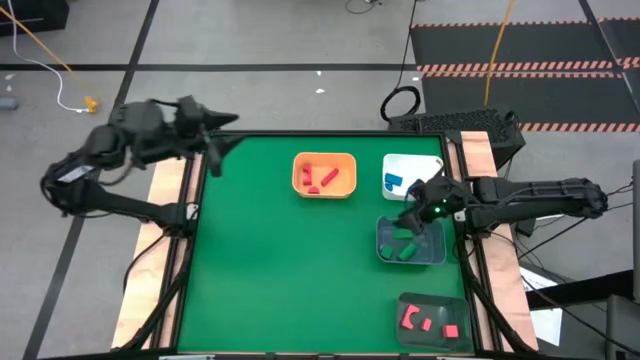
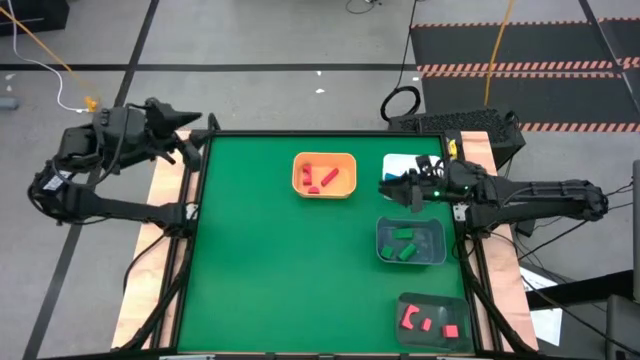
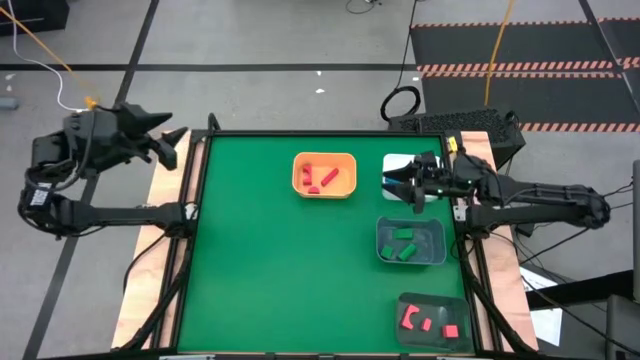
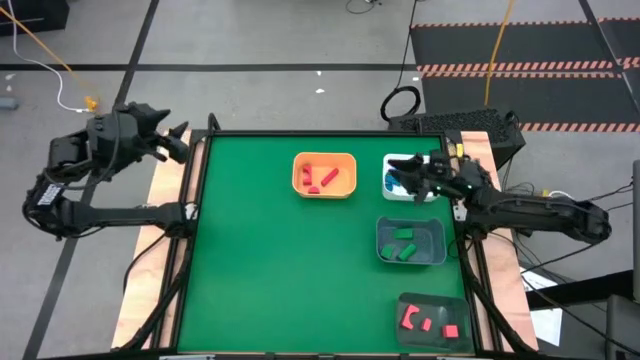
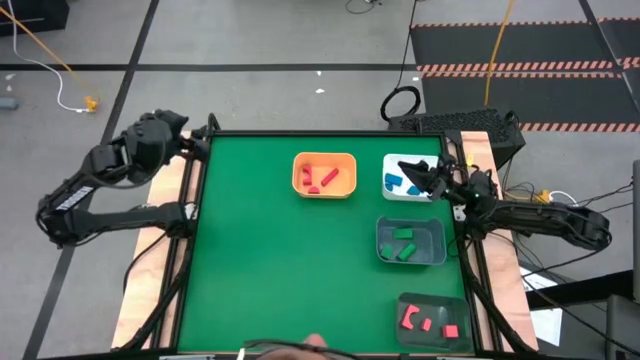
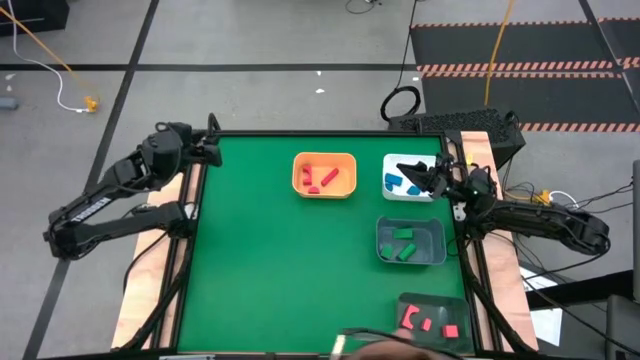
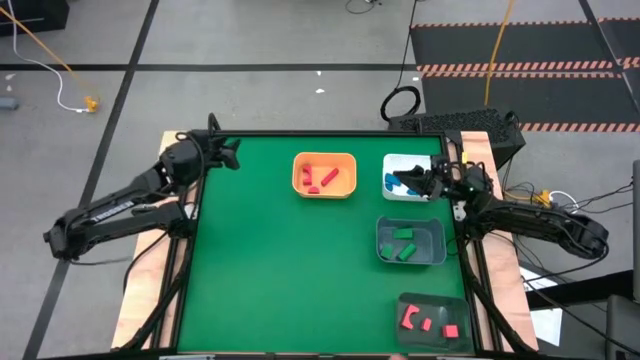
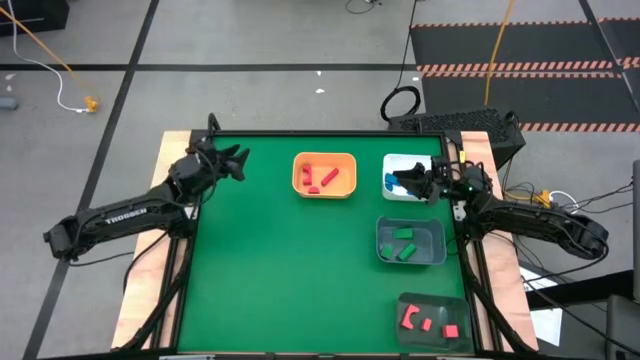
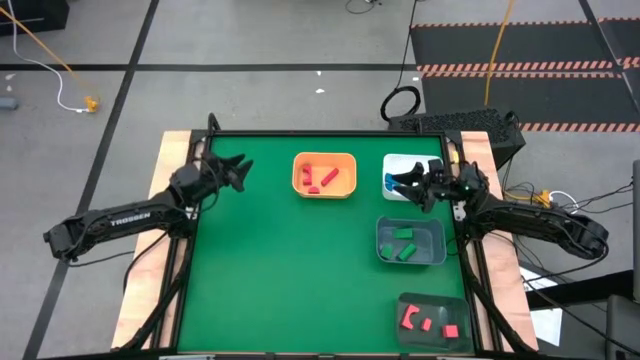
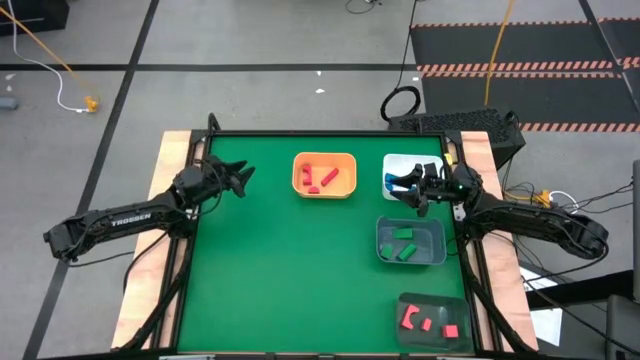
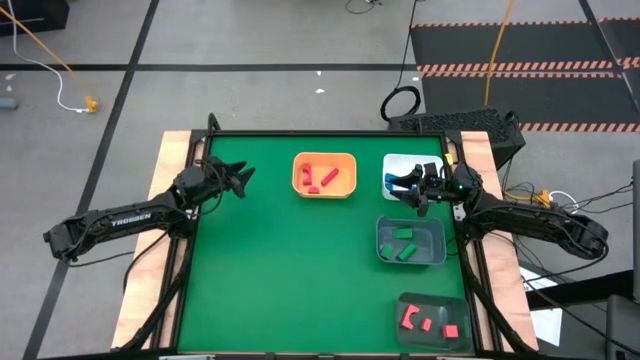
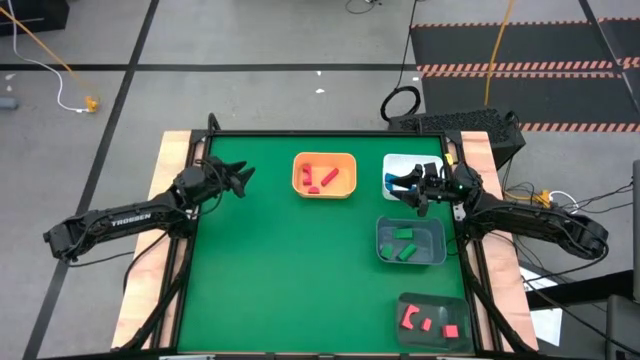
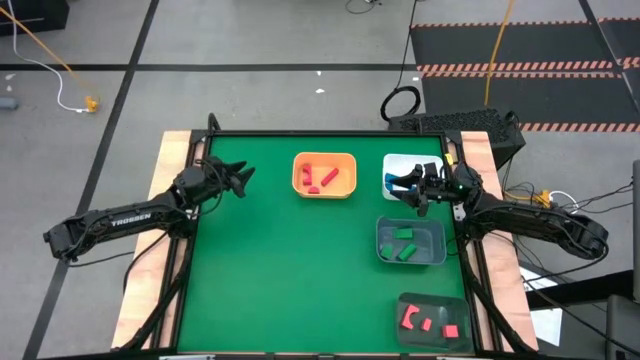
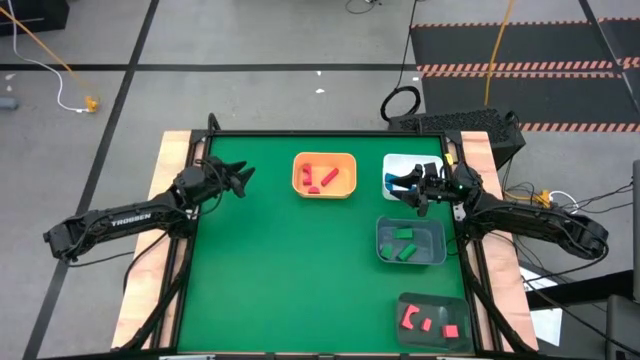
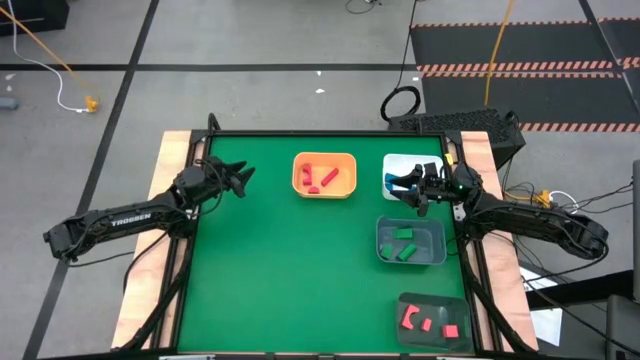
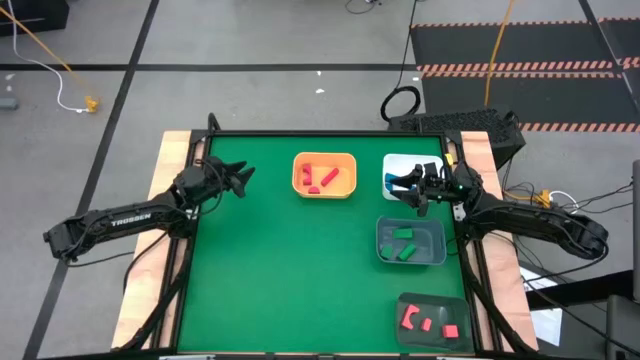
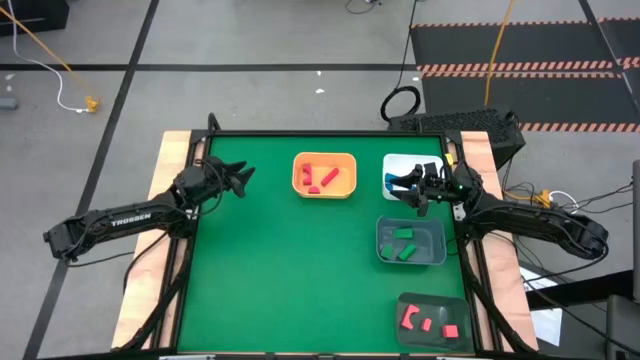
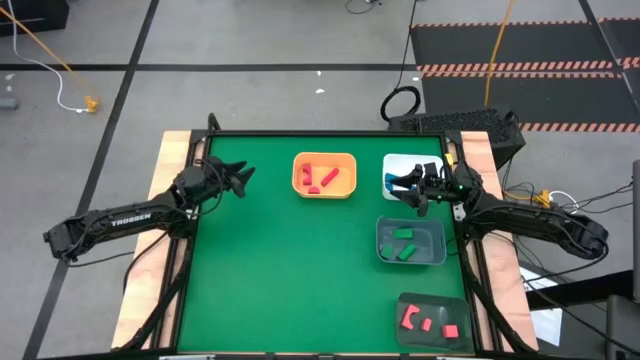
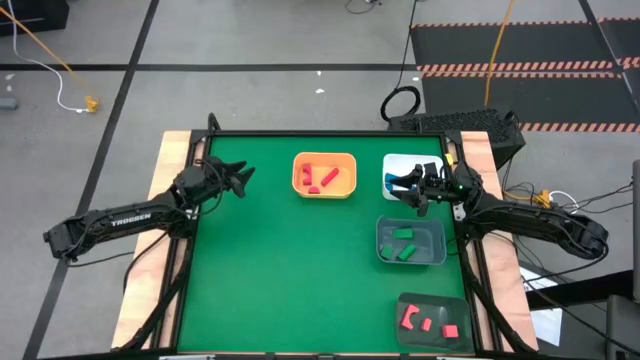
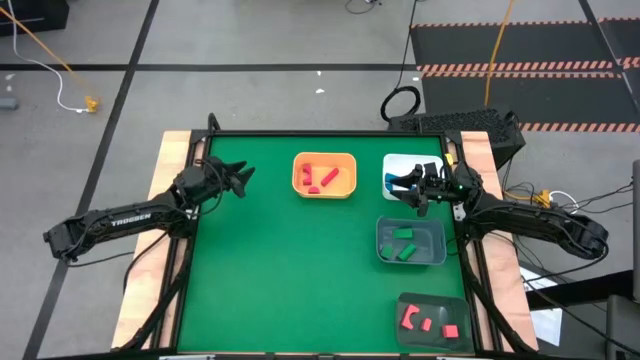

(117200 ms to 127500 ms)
Task: Sort & place blocks by color
Return to Home Position

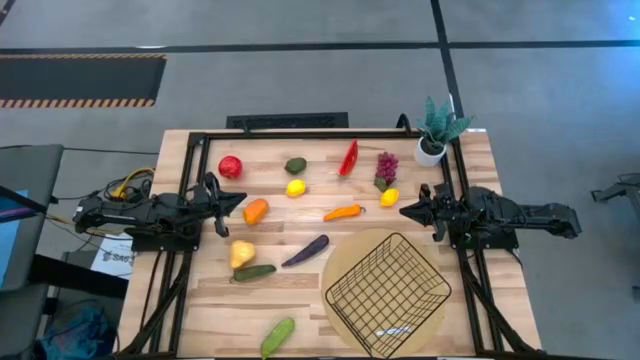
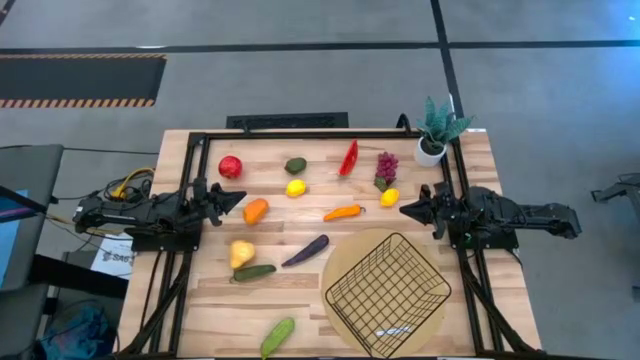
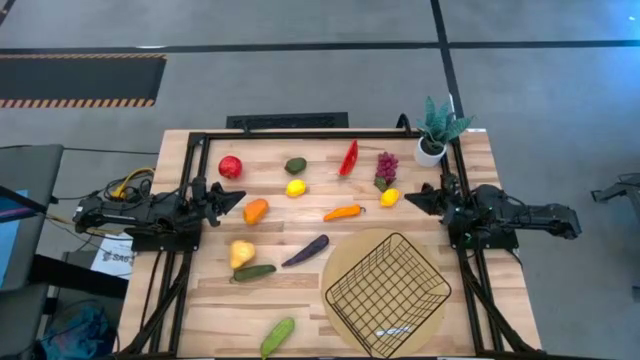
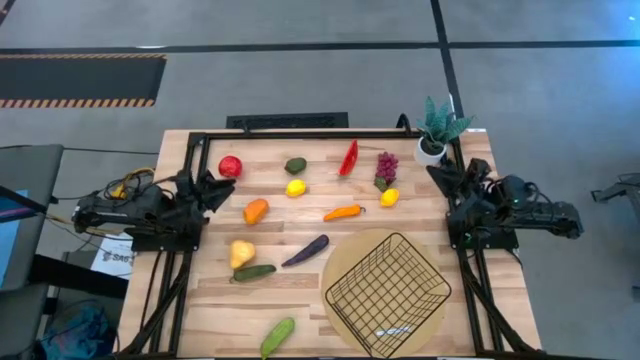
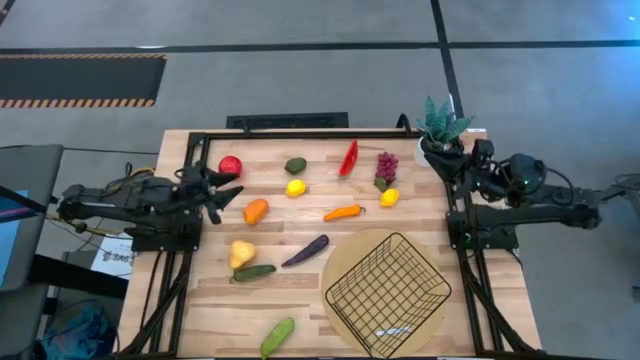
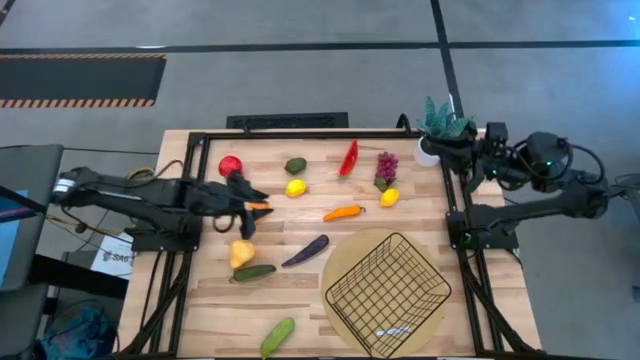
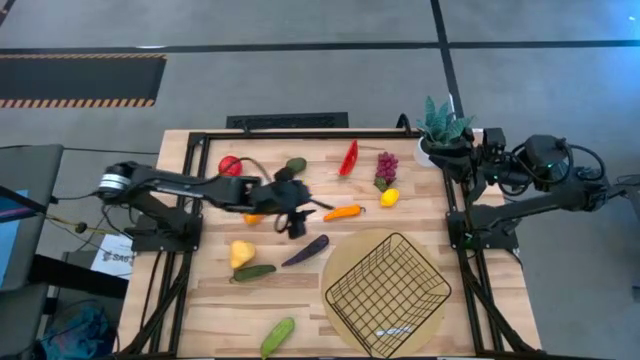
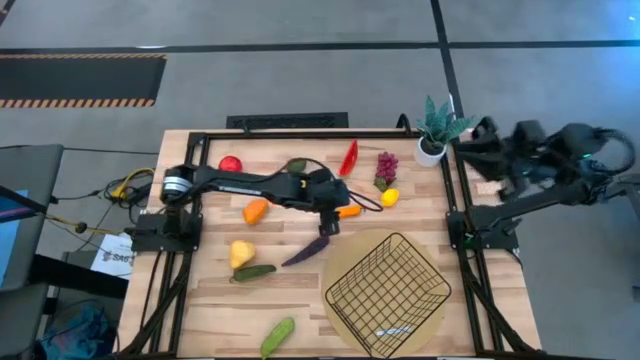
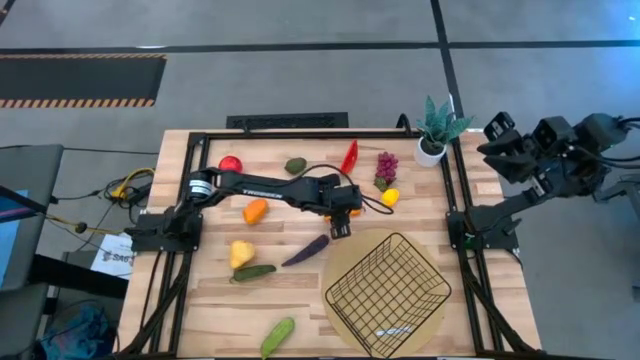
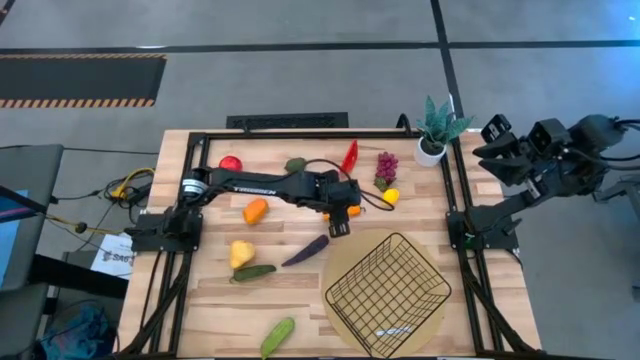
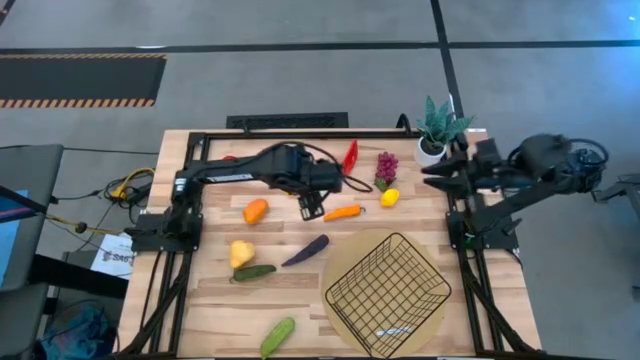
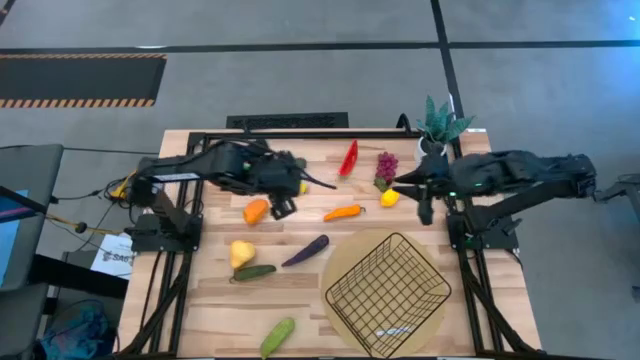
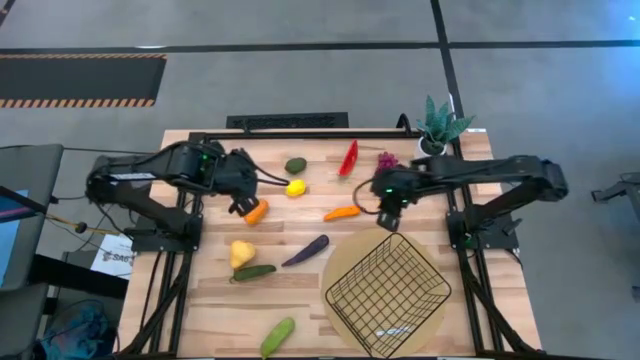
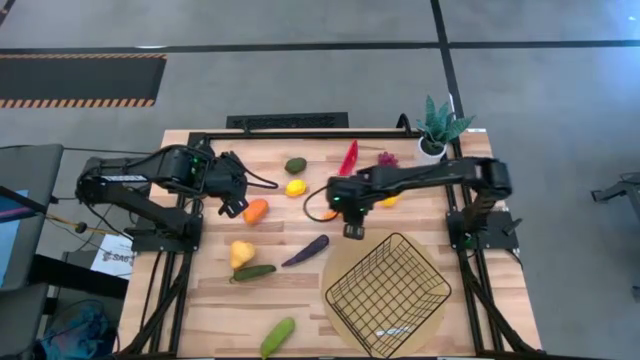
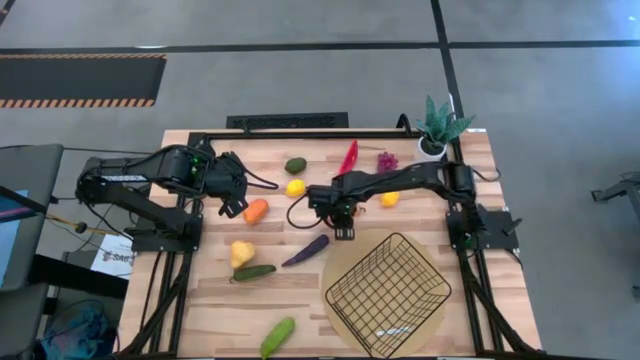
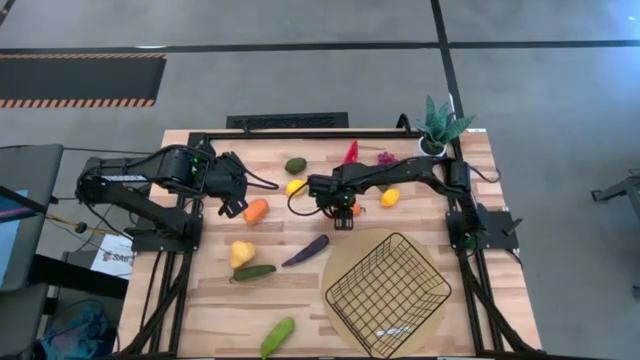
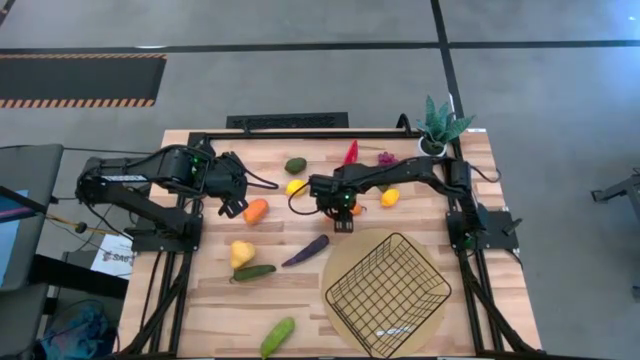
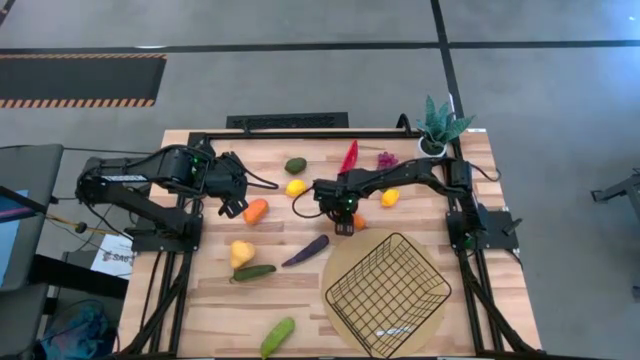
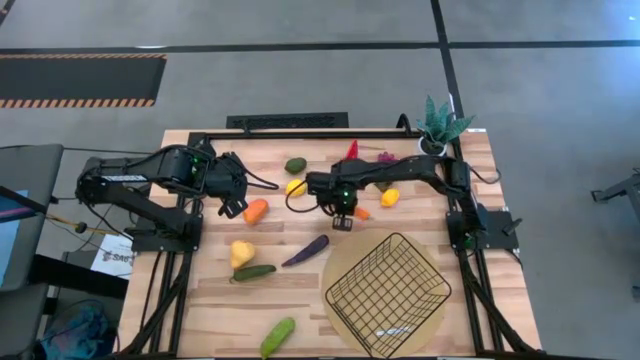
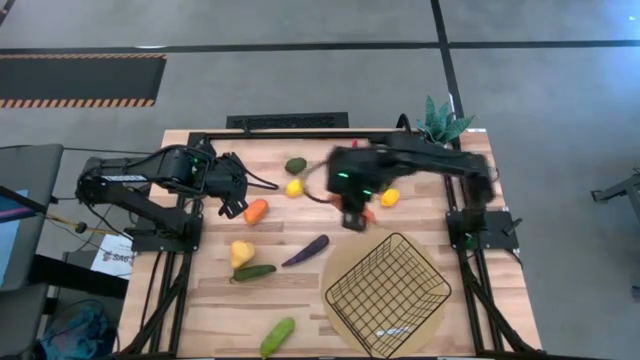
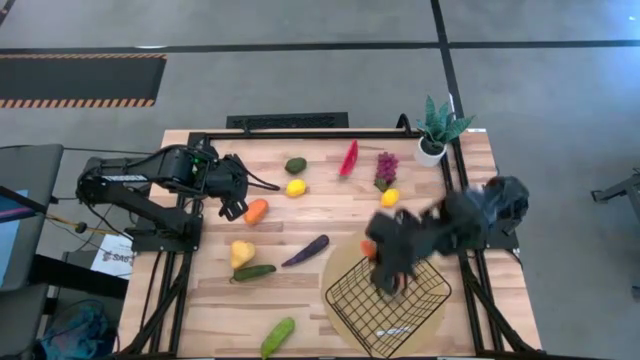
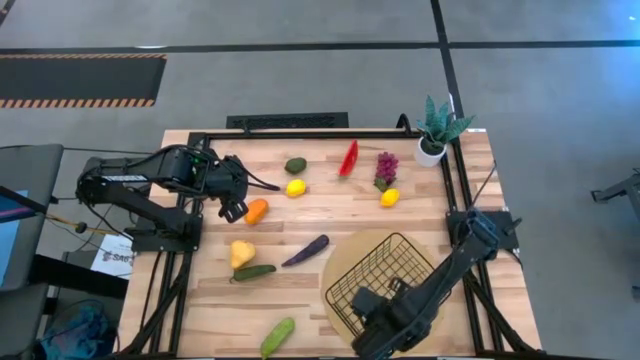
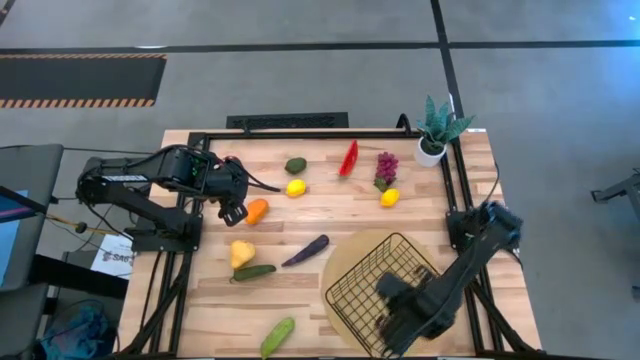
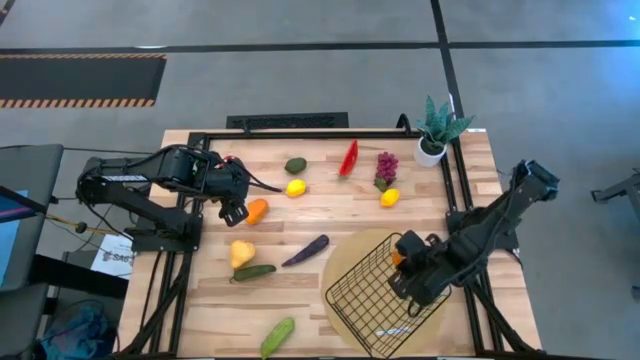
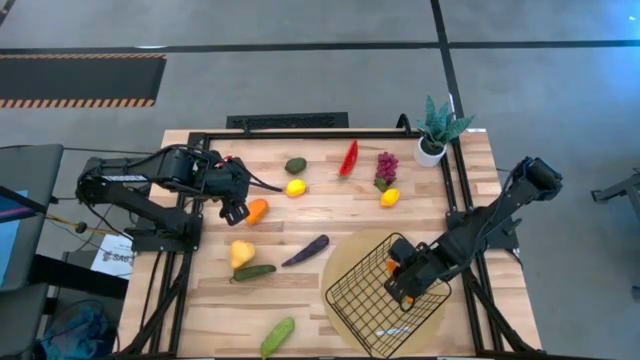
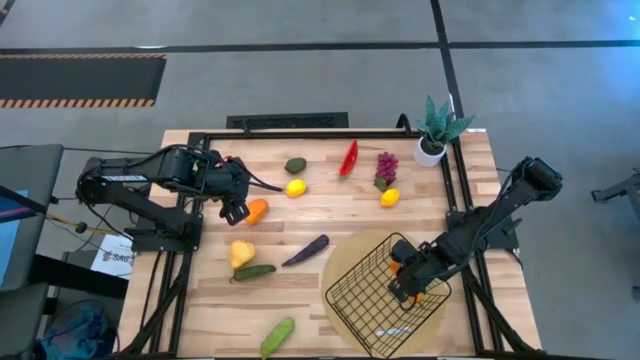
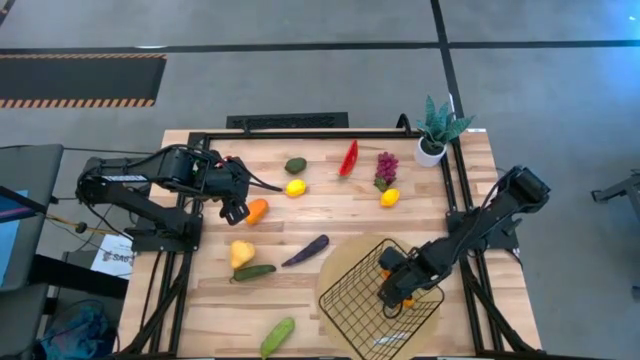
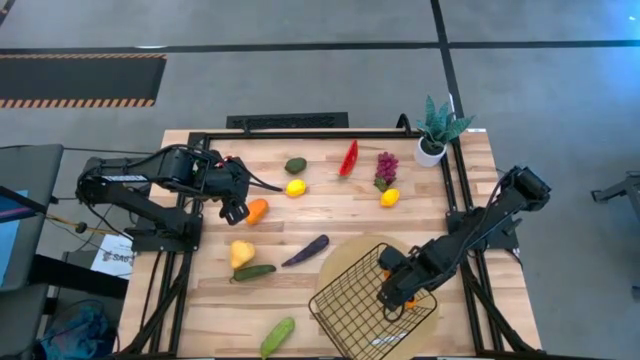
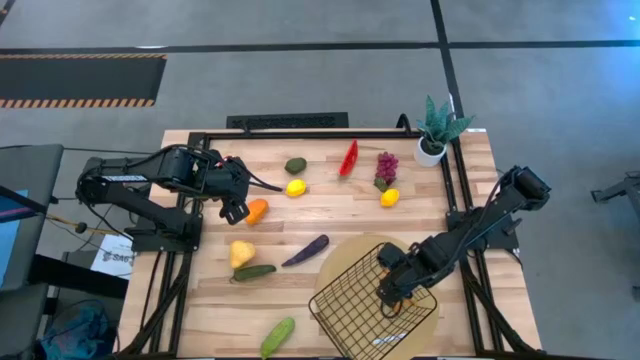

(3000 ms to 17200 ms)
Task: Build produce basket
Put the orange chili pepper into the mesh basket
